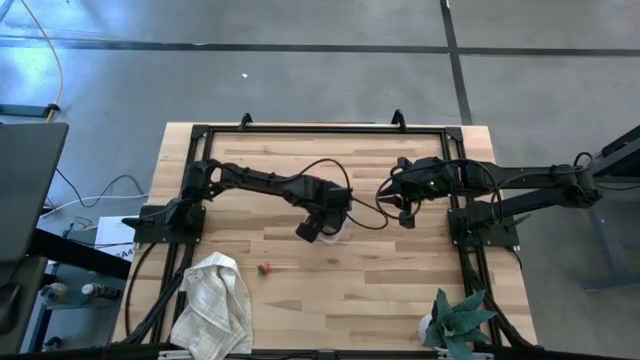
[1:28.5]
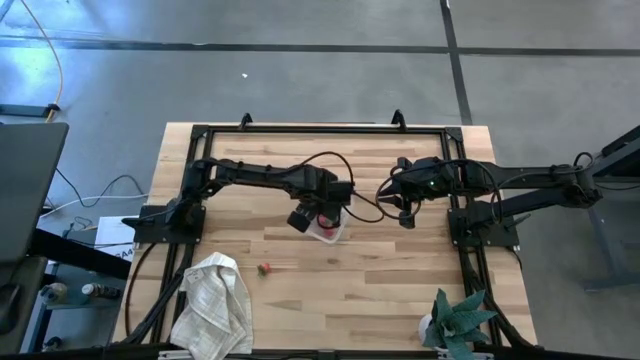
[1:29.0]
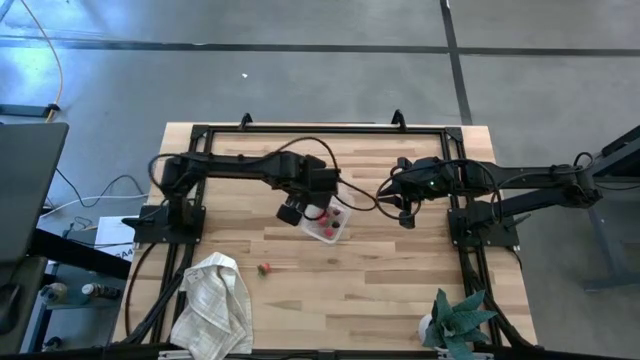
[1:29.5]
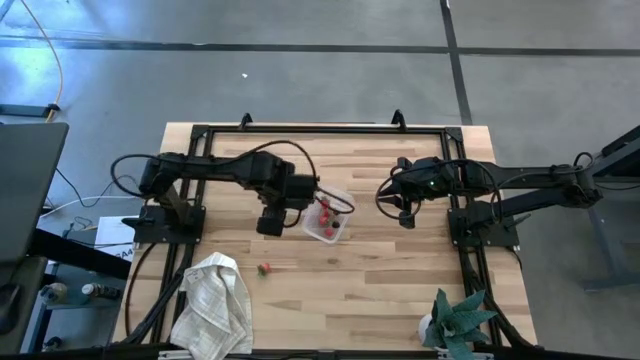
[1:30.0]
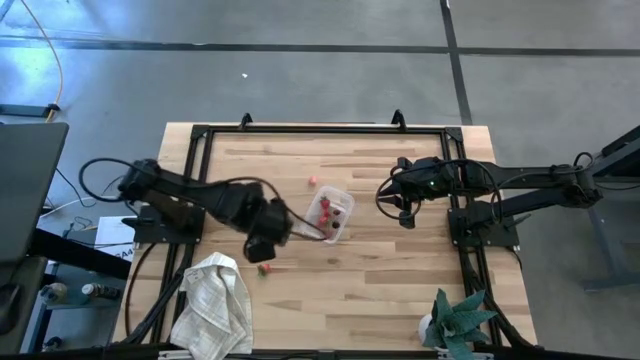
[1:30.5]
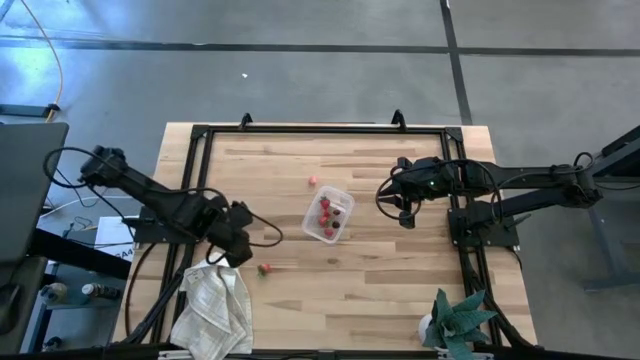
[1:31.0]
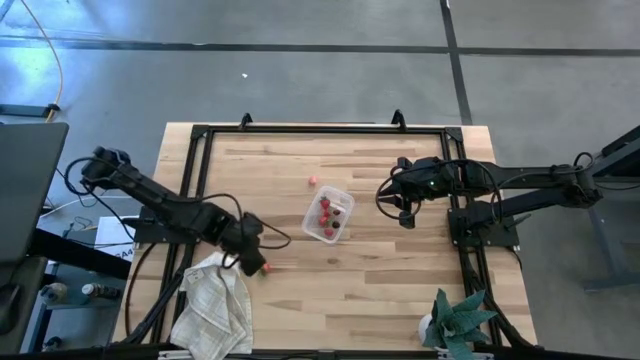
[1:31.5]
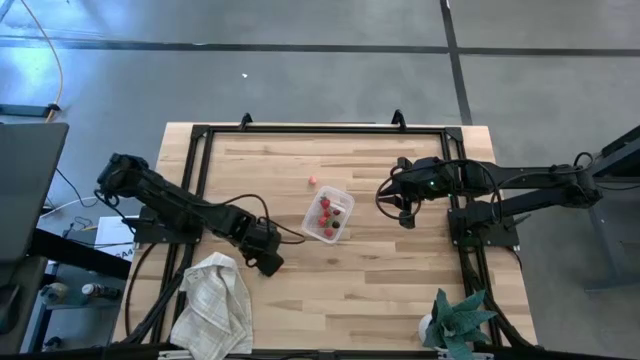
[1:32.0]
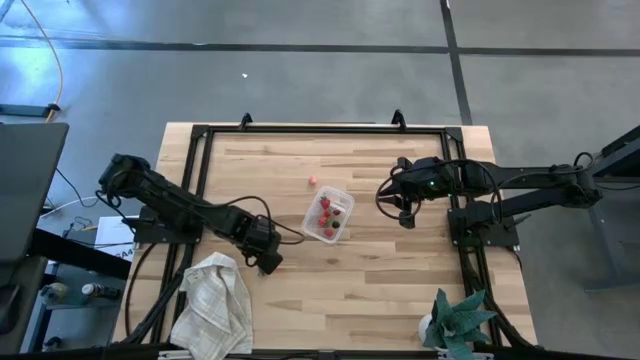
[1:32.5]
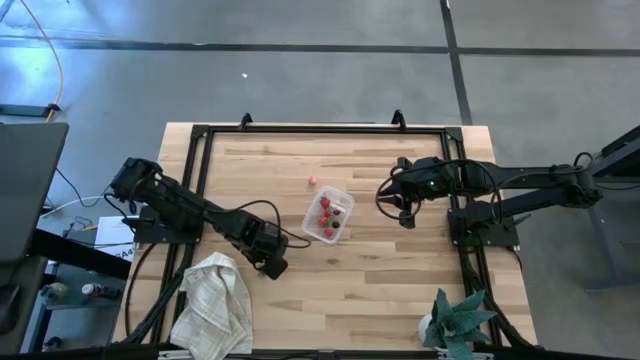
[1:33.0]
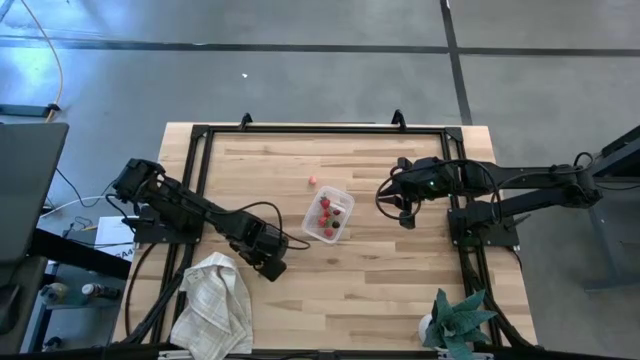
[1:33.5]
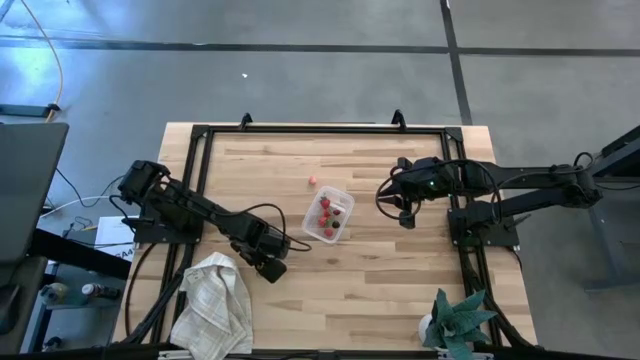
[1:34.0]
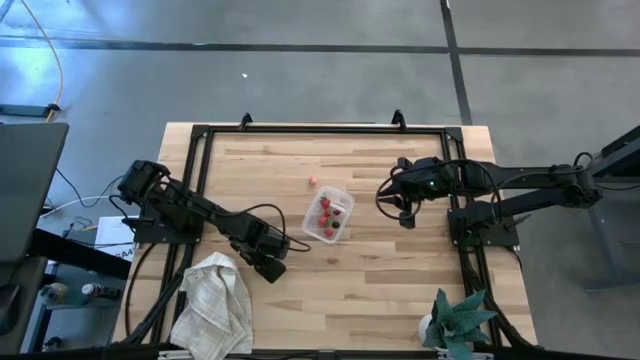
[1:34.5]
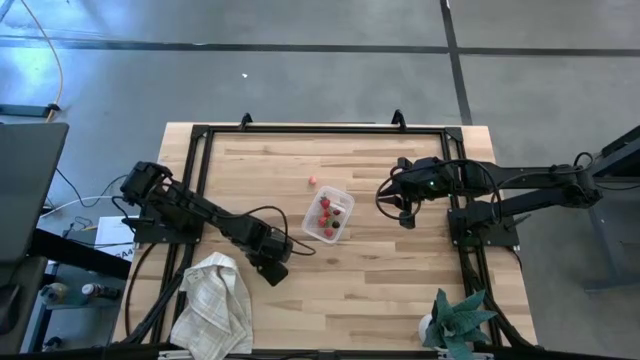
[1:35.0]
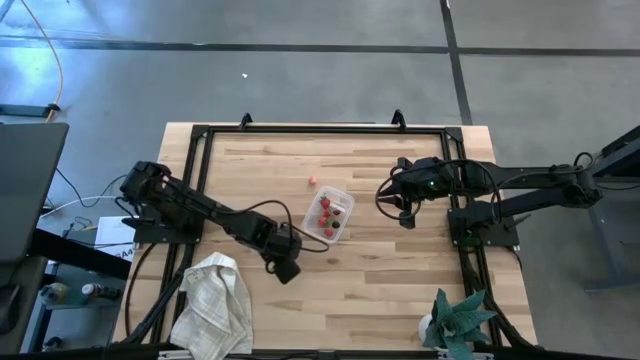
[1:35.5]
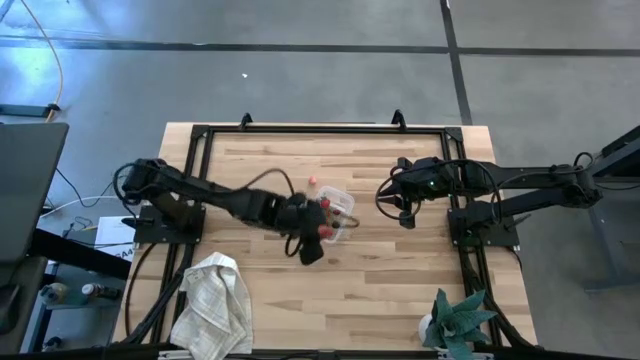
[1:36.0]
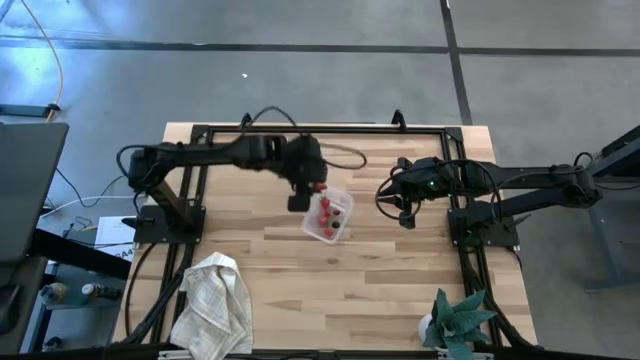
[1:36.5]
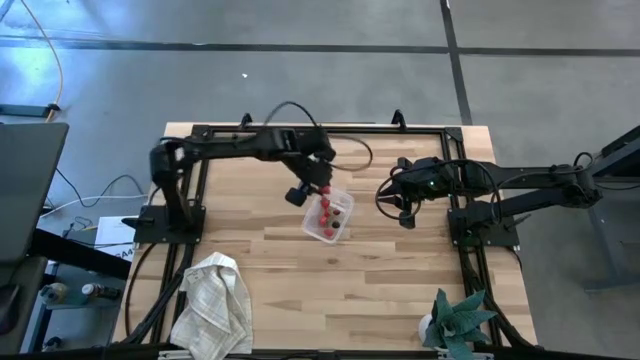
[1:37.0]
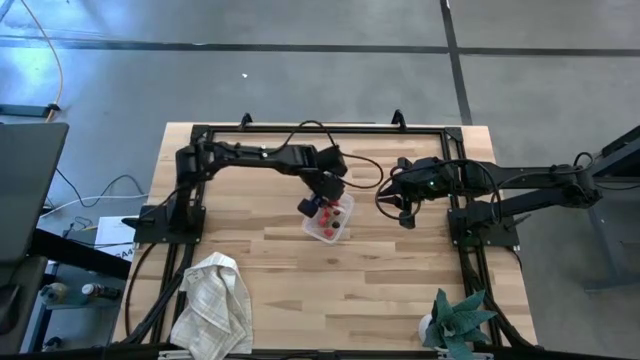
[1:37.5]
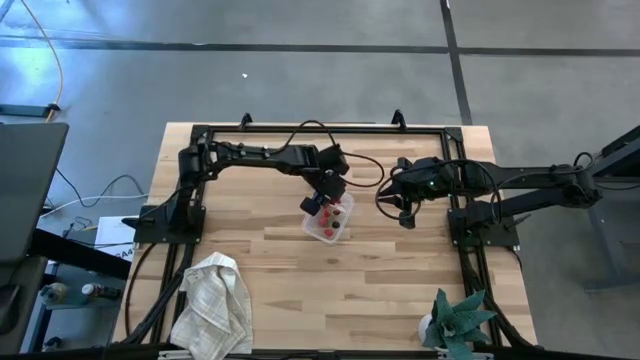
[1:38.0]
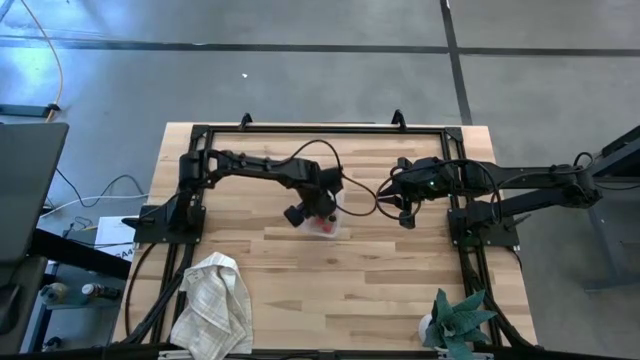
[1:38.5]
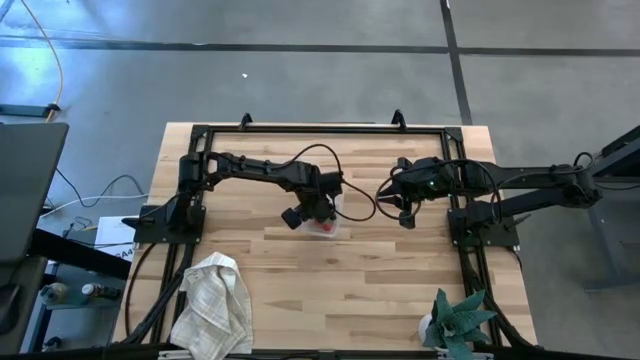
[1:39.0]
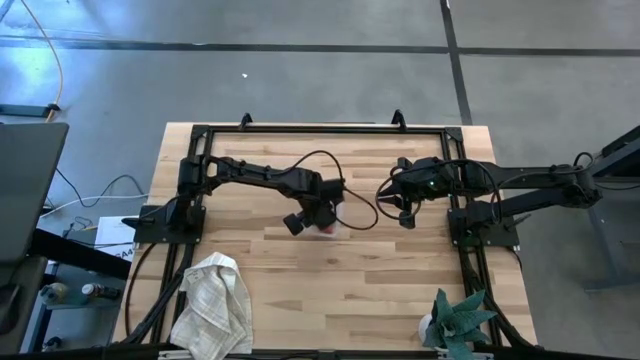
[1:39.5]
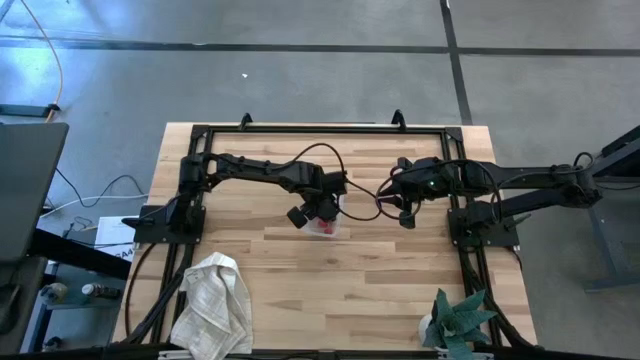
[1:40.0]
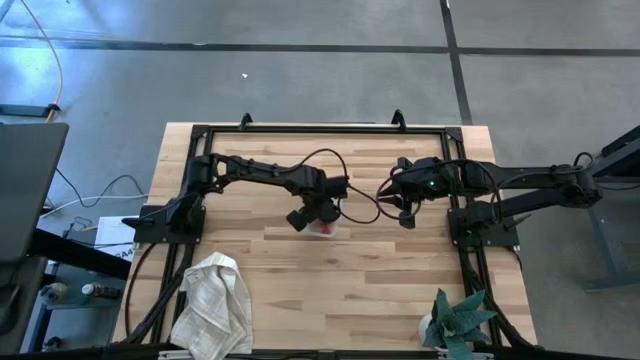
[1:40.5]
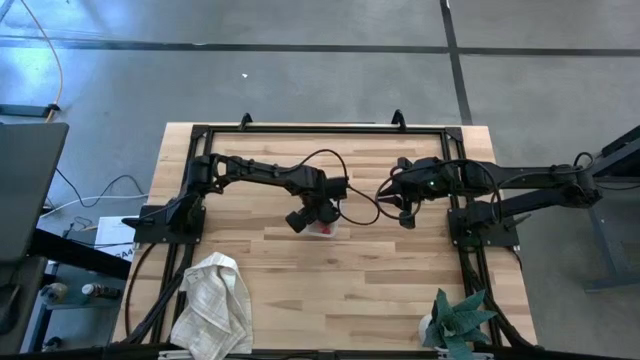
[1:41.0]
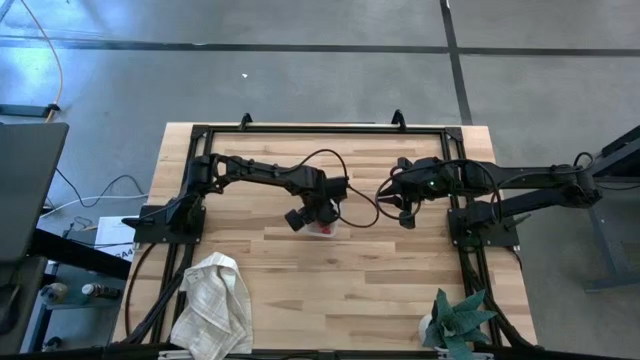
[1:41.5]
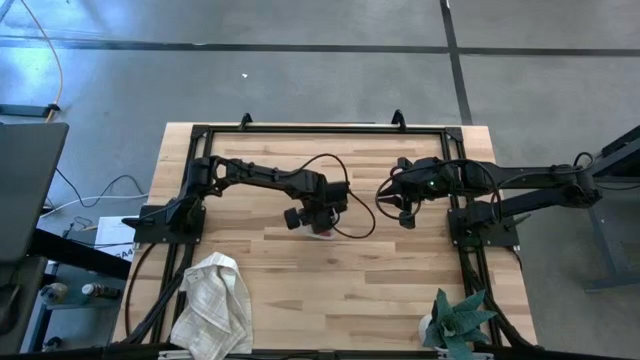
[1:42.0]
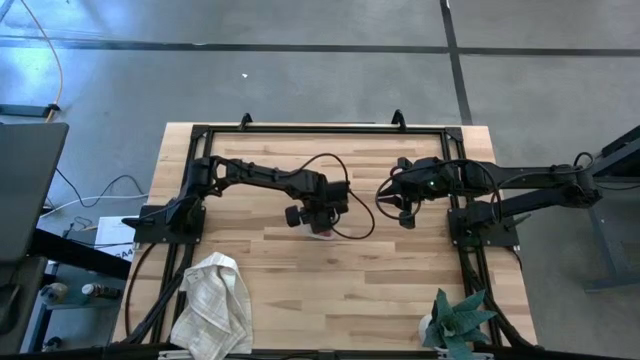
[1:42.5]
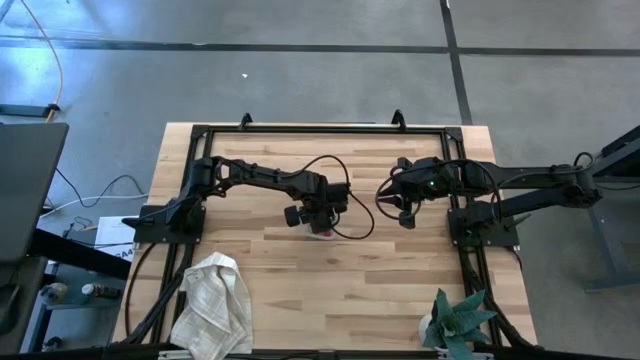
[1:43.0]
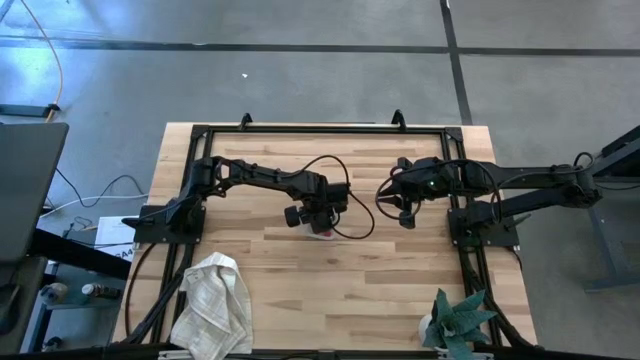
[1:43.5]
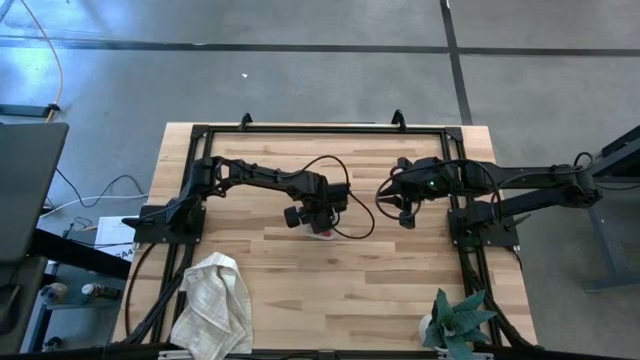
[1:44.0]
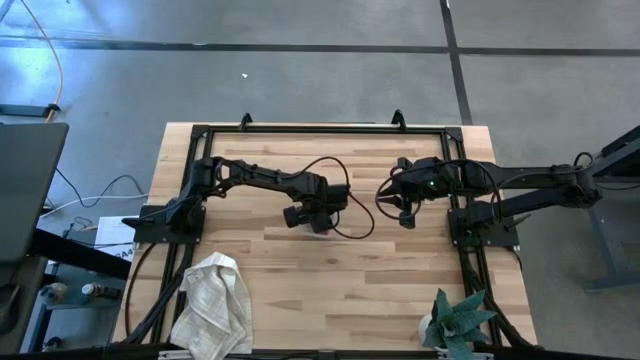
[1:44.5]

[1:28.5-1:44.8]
Task: Pick and placing Produce into tupperware
Put the strawberry into the transparent bin

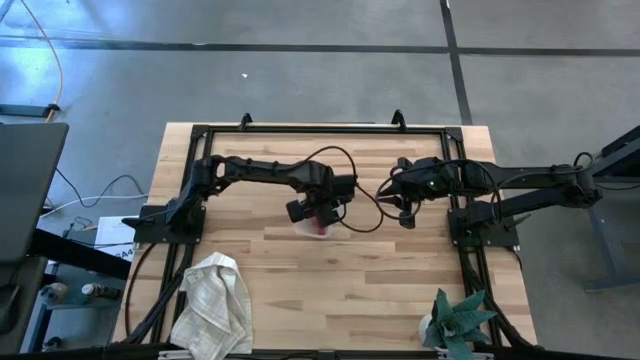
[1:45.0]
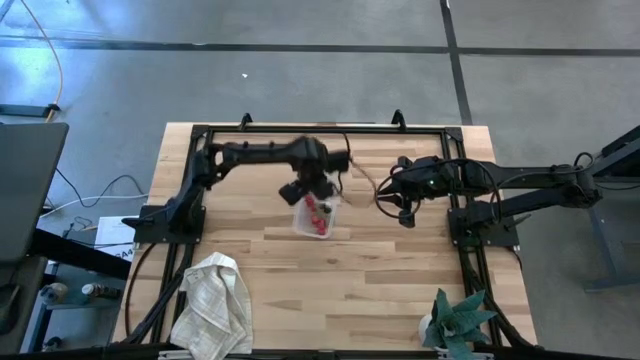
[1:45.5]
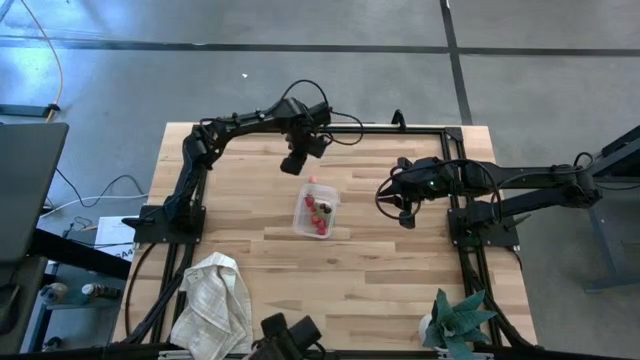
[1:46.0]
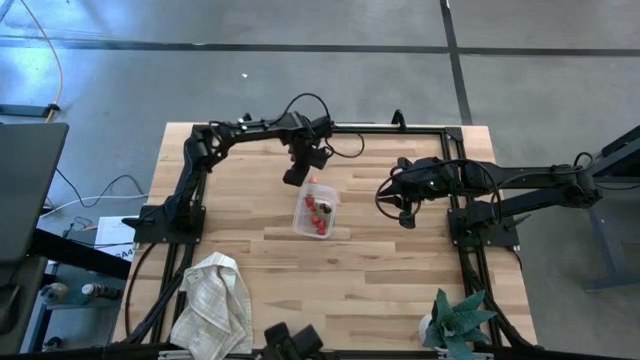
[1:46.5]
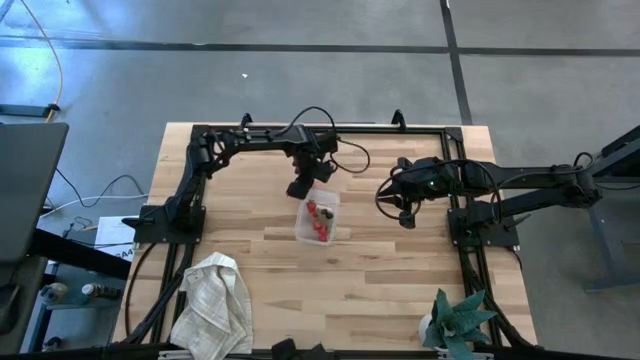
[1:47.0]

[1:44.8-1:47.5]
Adjust the transparent bin

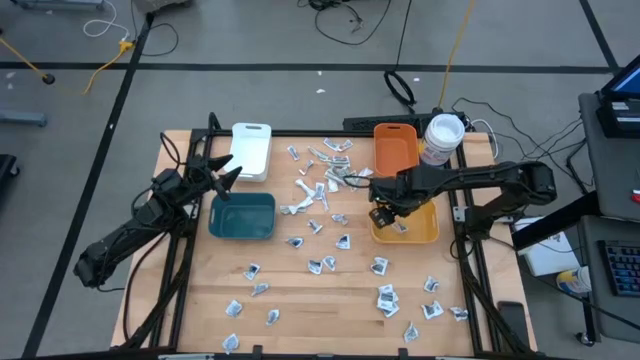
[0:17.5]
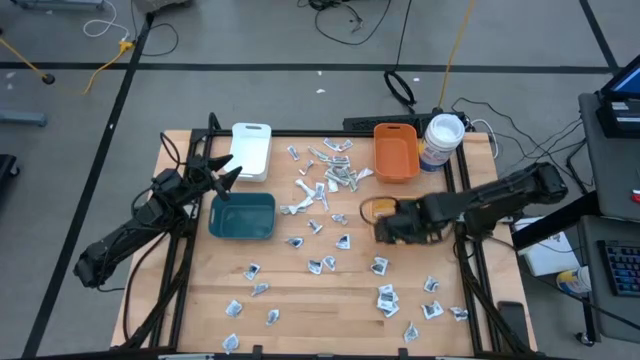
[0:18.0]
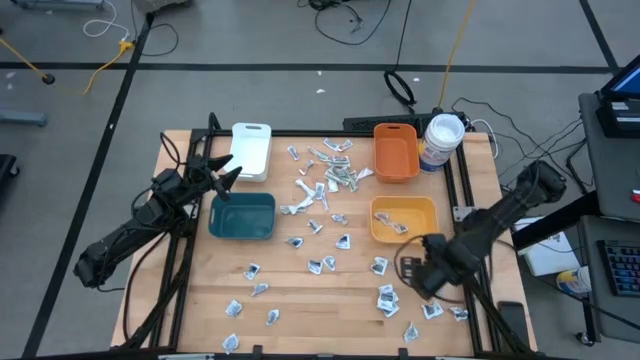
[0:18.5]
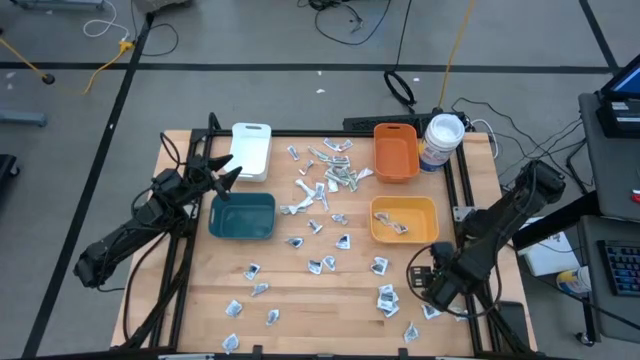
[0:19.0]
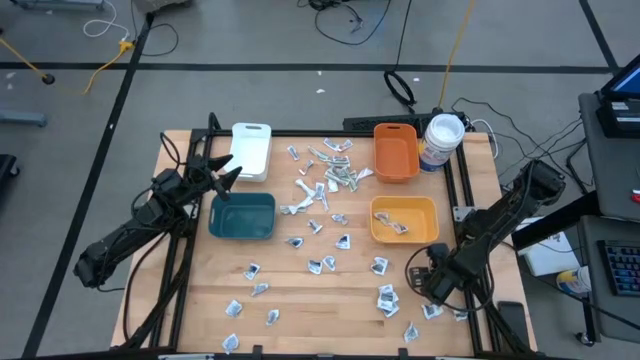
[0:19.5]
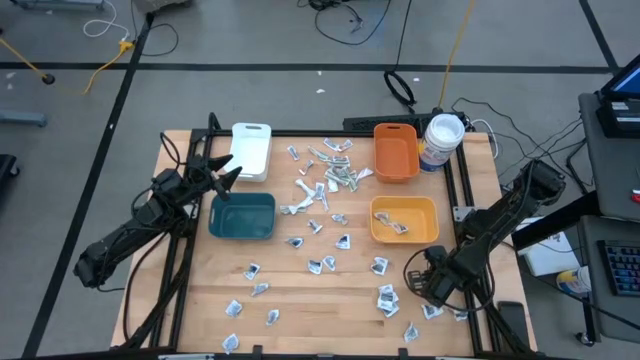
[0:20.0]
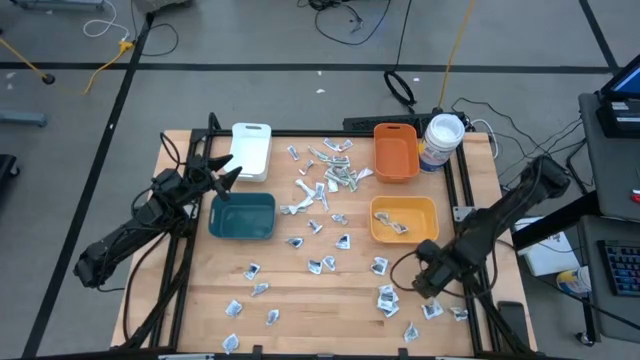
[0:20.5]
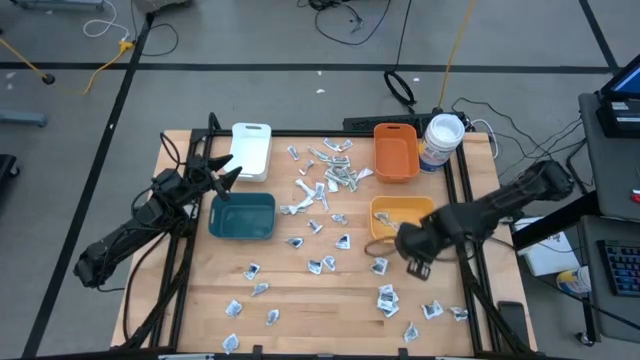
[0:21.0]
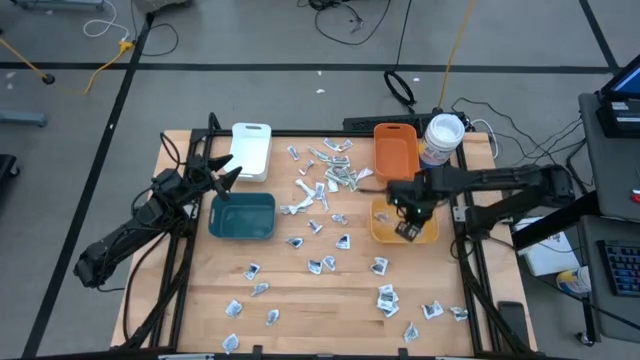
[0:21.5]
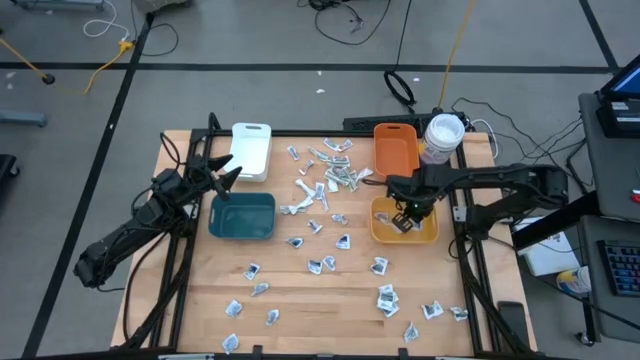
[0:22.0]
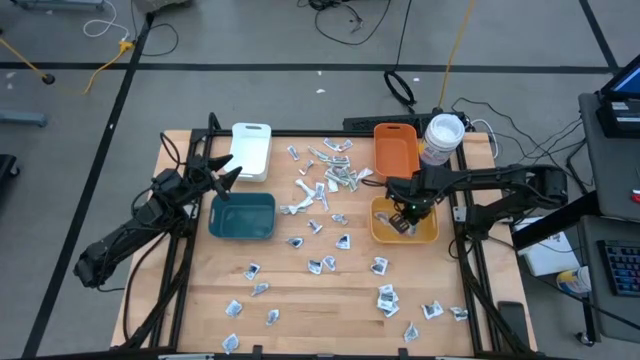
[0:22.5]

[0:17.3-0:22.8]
Task: Pick & Place First Aid Supplies
Put the antiseptic towelette into the yellow bin
